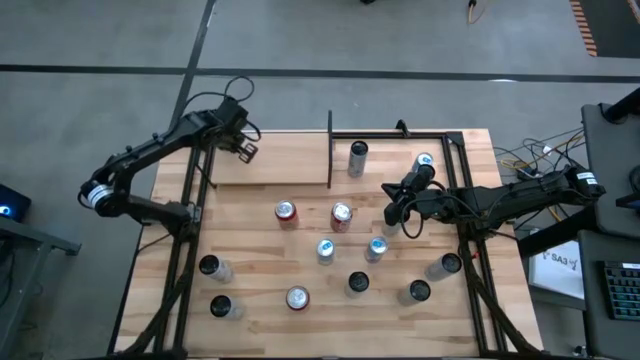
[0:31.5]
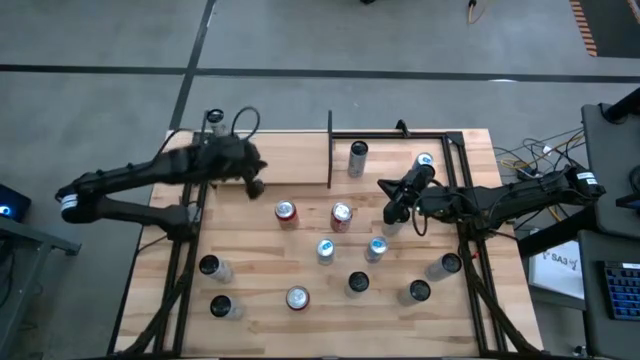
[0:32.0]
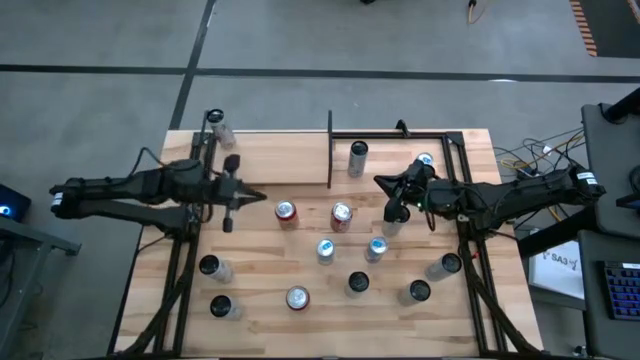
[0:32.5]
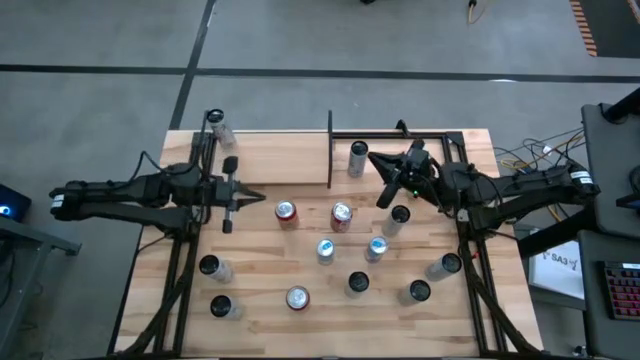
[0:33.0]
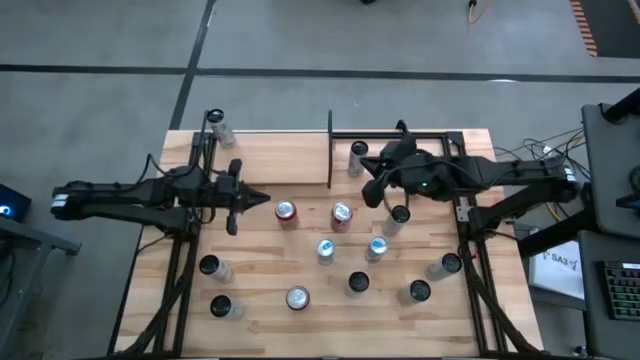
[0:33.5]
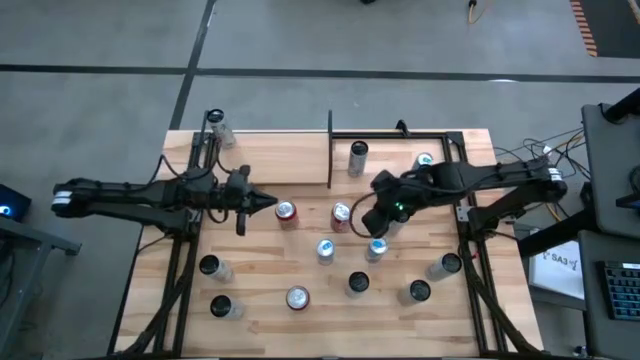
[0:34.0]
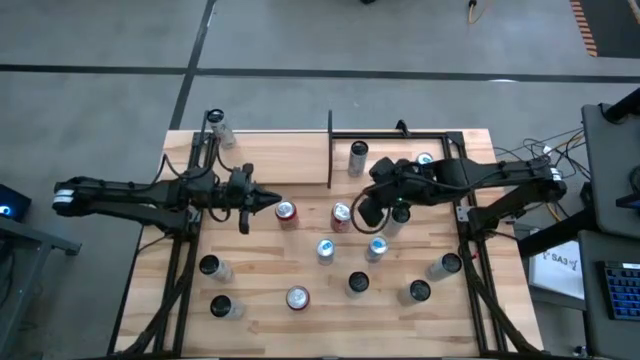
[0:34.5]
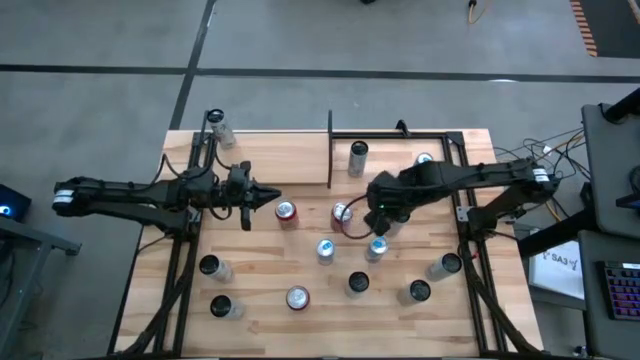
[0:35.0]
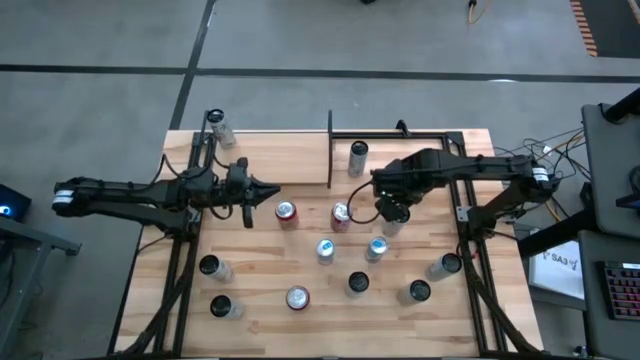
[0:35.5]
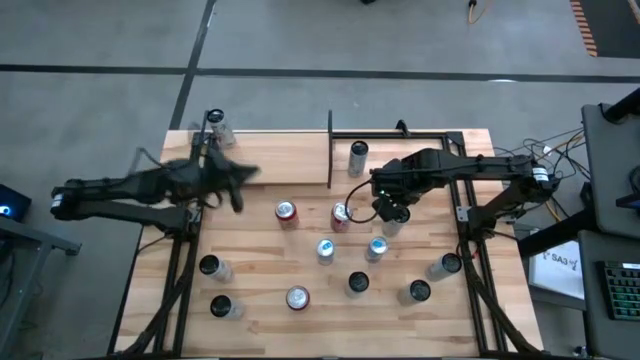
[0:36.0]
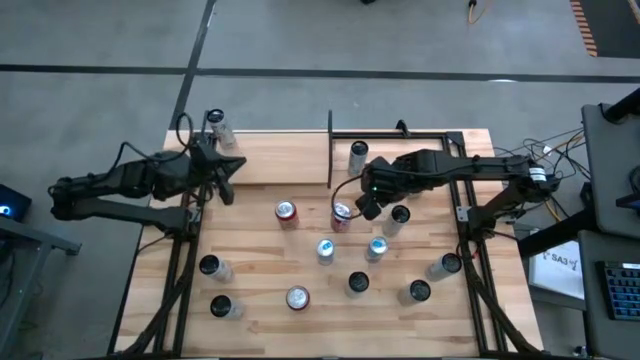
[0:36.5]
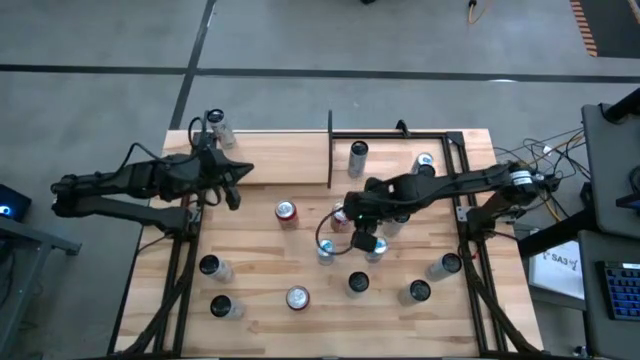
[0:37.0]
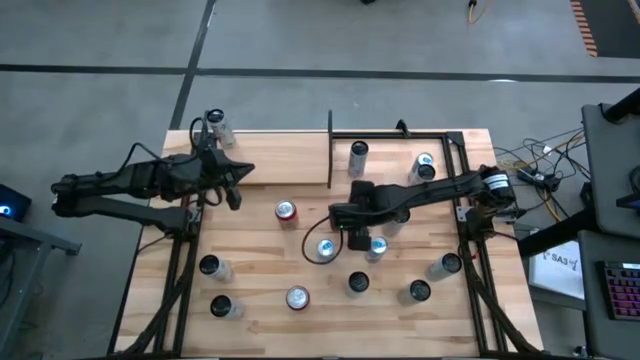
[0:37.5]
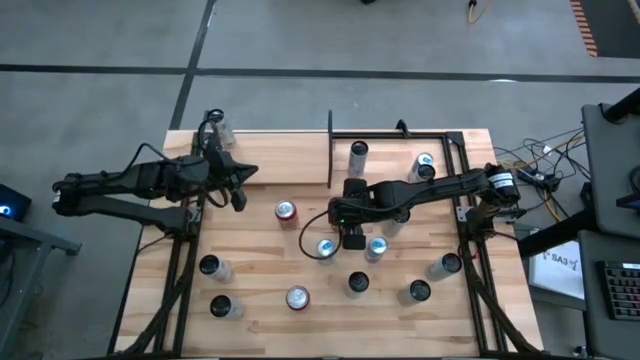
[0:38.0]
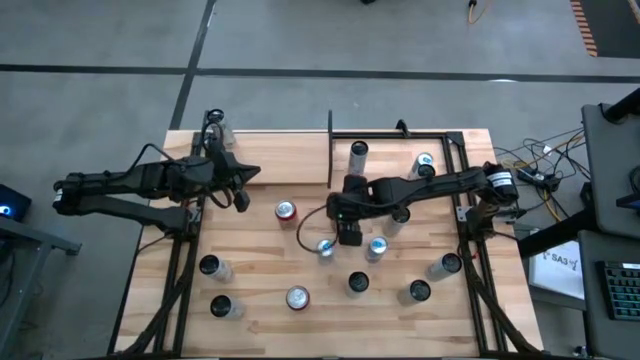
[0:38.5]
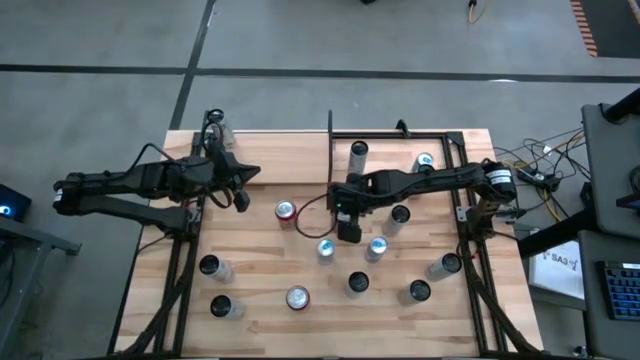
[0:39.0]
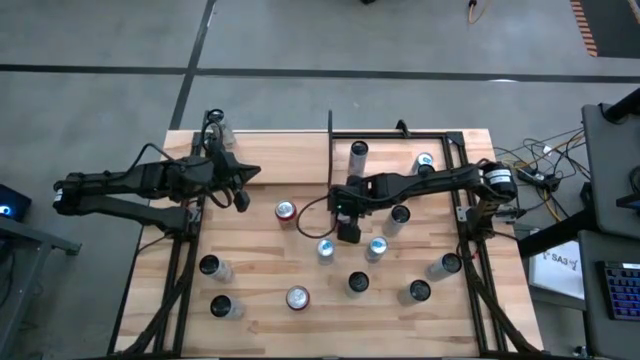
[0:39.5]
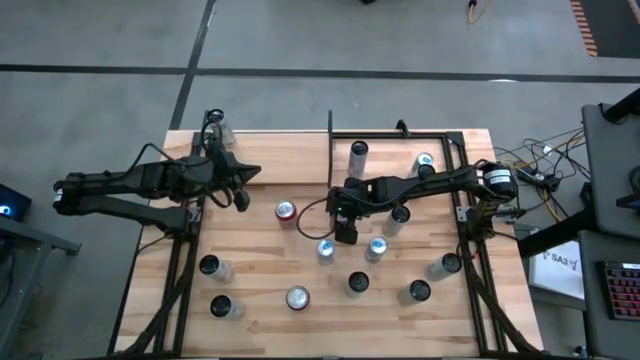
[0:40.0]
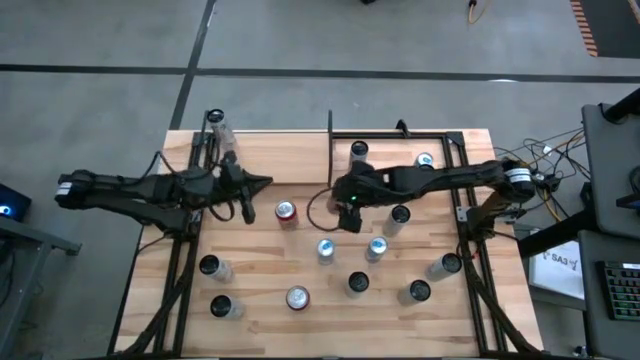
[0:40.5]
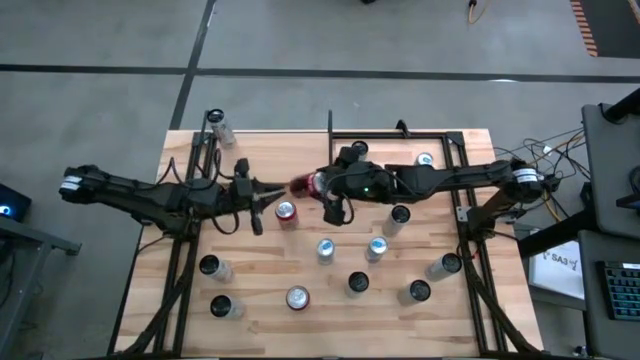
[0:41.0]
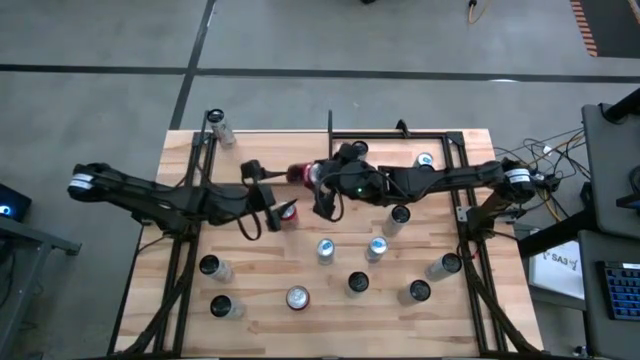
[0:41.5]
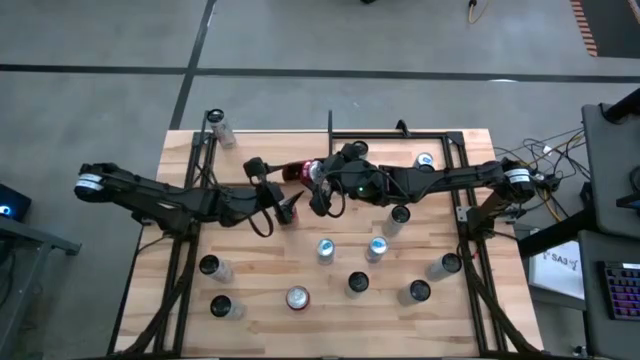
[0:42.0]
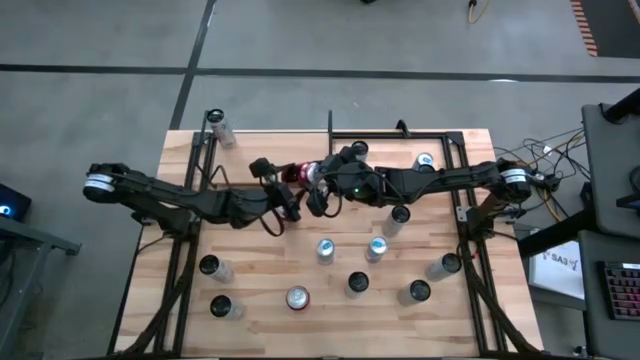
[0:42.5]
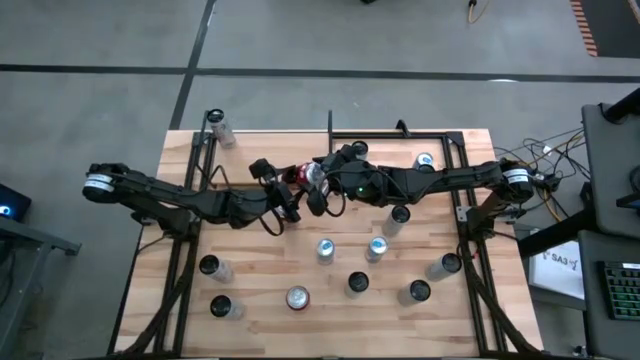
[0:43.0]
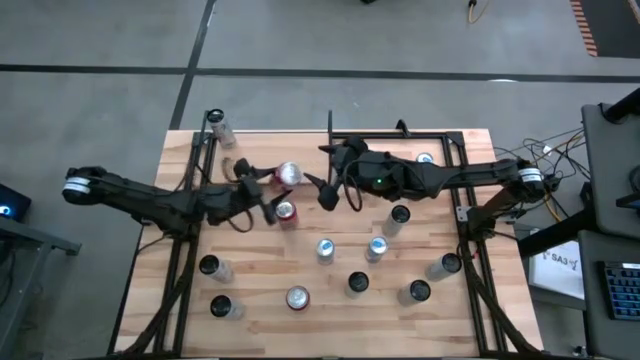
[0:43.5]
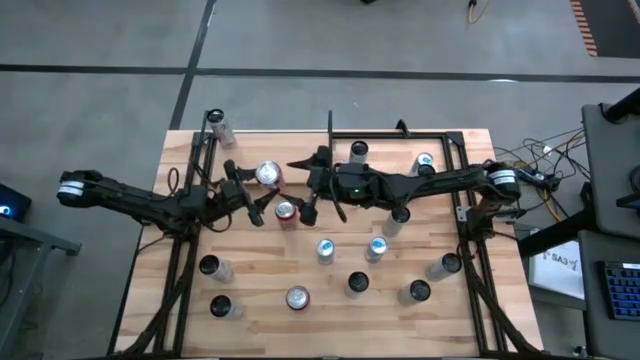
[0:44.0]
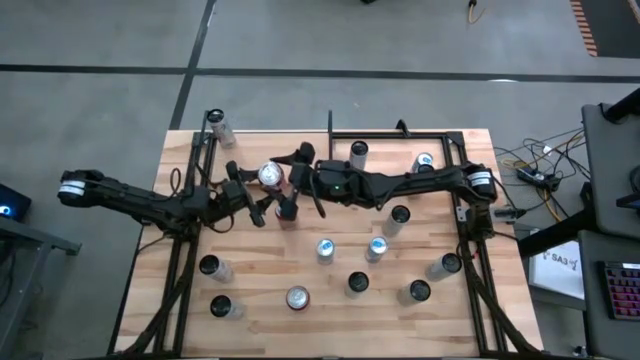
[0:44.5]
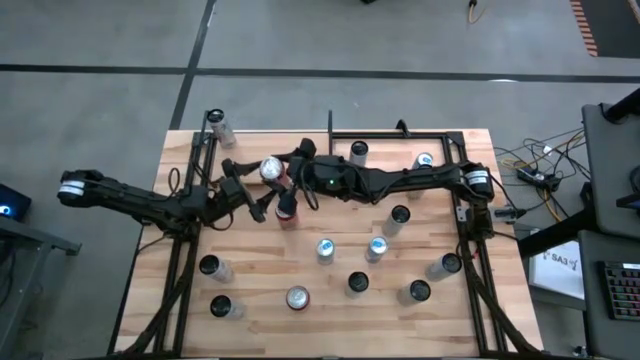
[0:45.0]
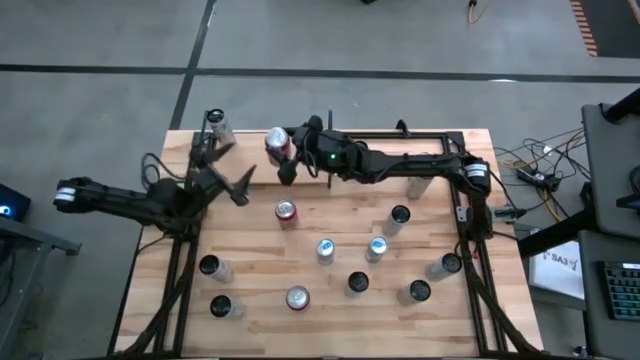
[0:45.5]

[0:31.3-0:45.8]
Task: Place canned beverage on shelf
Put the red and white soda can on the shelf

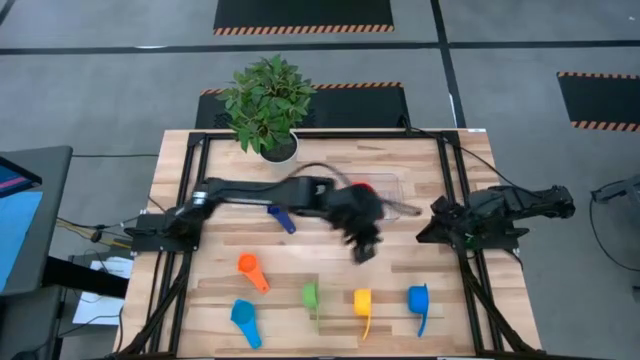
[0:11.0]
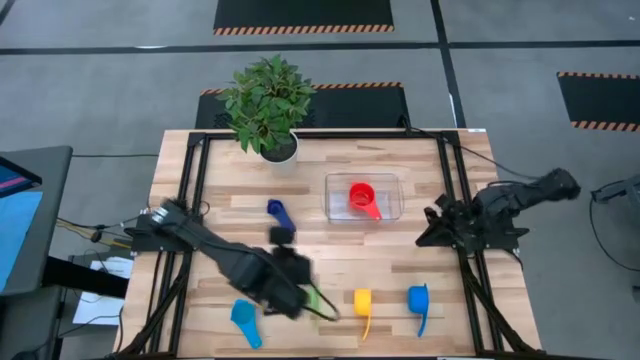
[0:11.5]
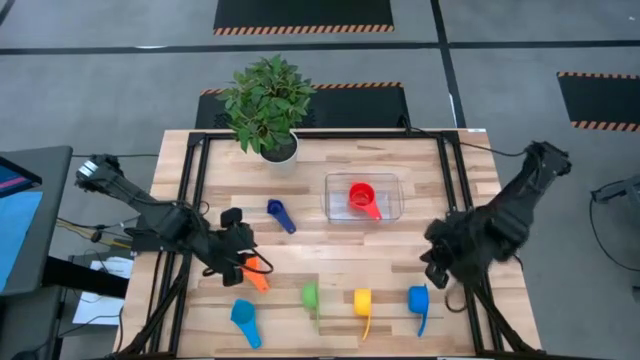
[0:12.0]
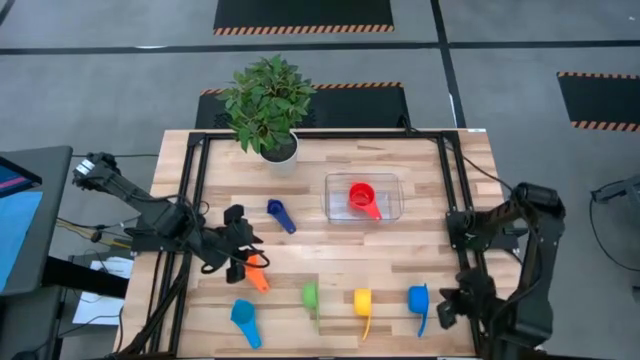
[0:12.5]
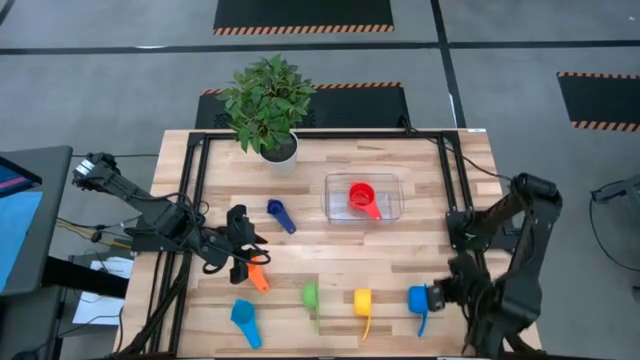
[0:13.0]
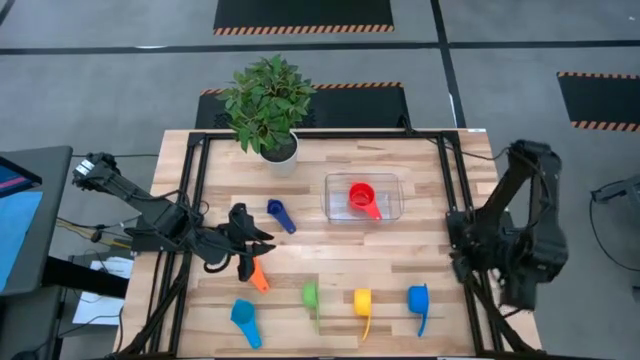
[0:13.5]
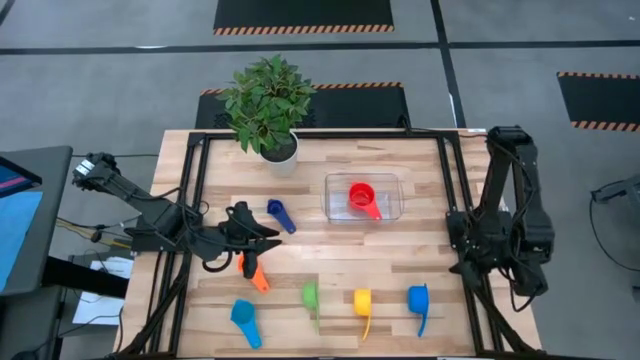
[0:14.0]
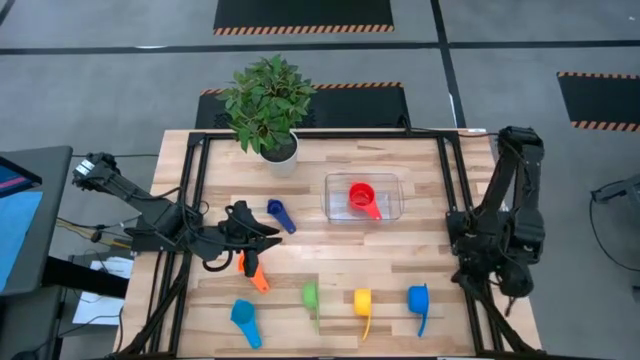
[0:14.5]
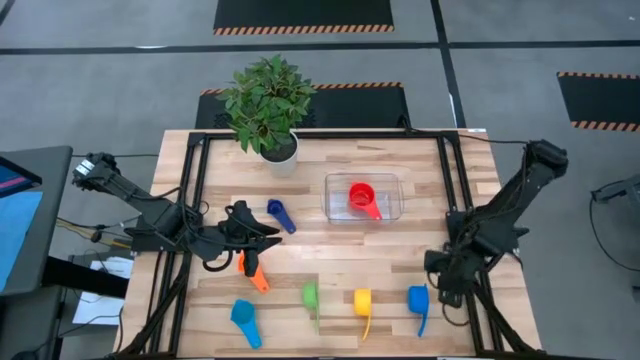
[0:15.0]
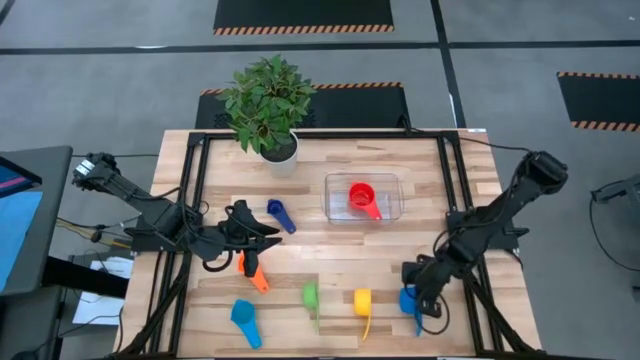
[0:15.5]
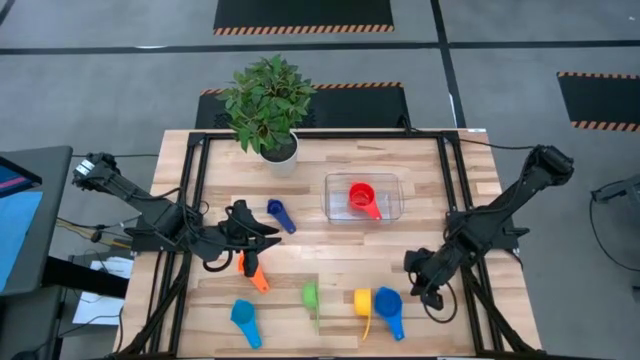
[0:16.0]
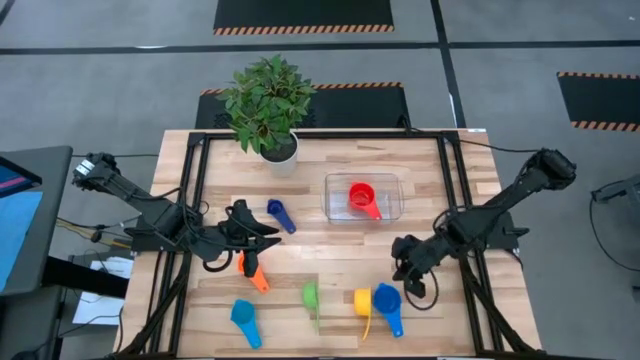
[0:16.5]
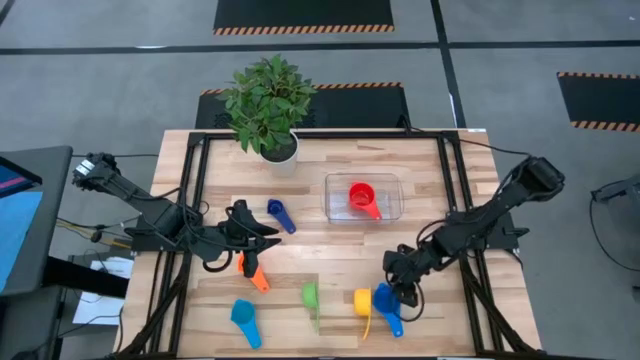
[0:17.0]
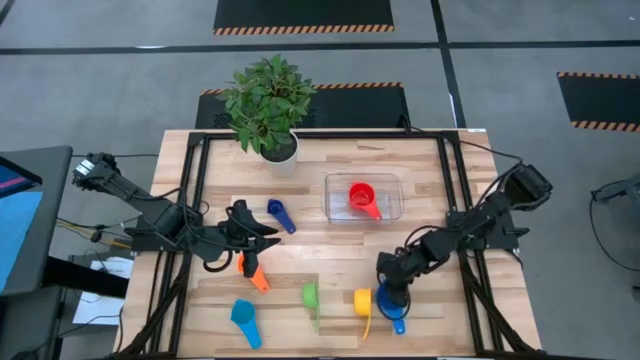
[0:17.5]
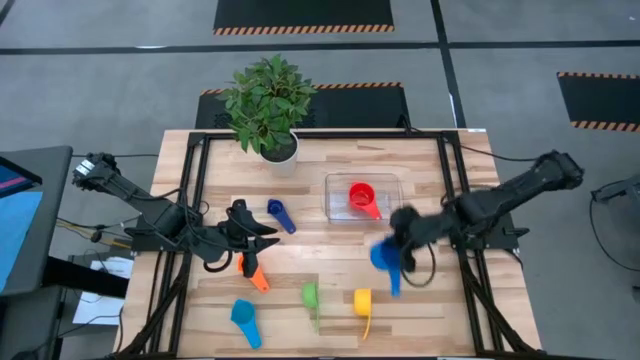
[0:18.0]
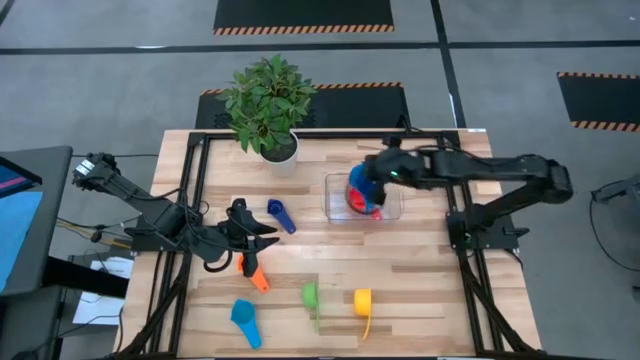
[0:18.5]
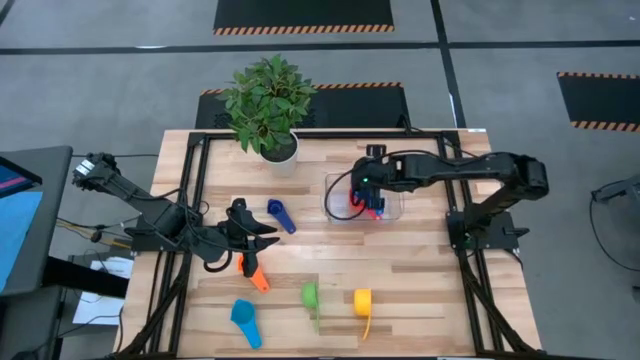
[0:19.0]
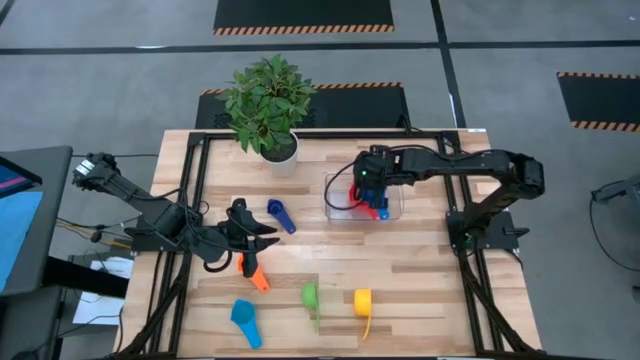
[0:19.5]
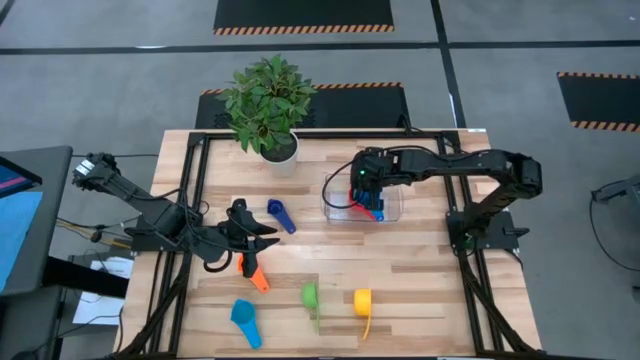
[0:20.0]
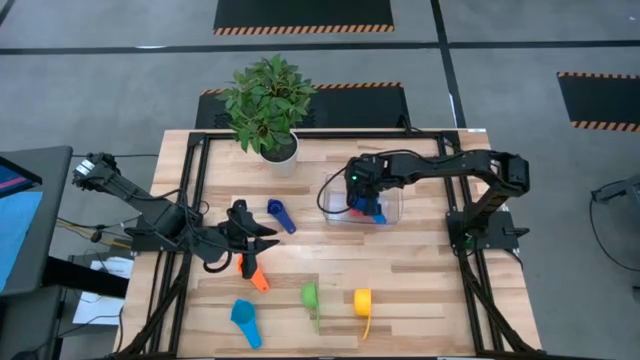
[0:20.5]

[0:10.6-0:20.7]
Task: Nest measuring cups in basket
Stack the blue measuring cup on top of the red measuring cup in the transparent bin
